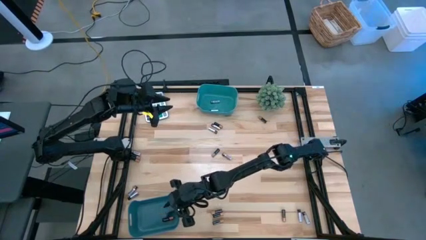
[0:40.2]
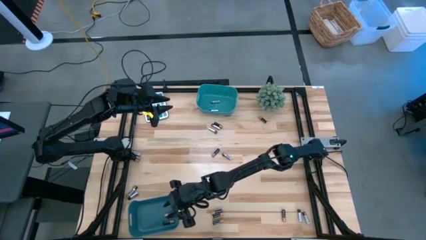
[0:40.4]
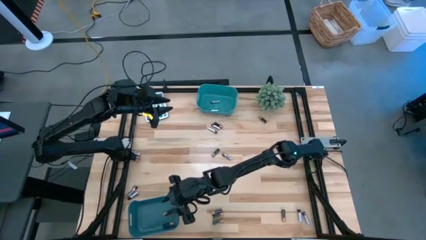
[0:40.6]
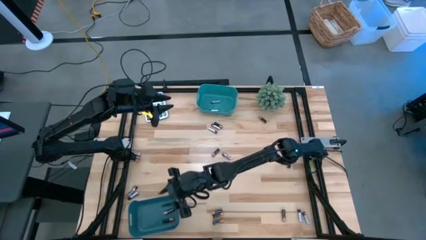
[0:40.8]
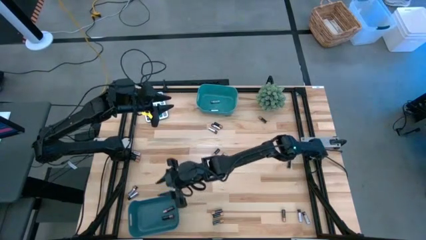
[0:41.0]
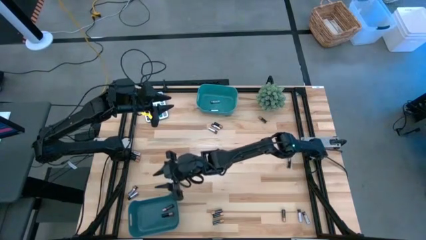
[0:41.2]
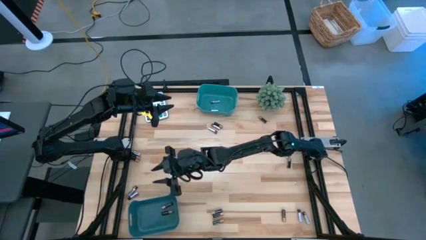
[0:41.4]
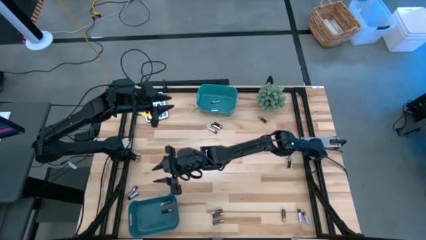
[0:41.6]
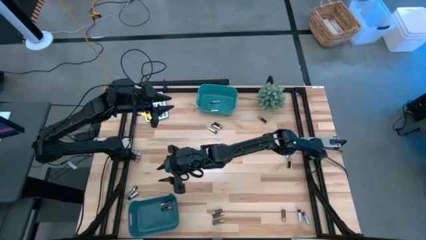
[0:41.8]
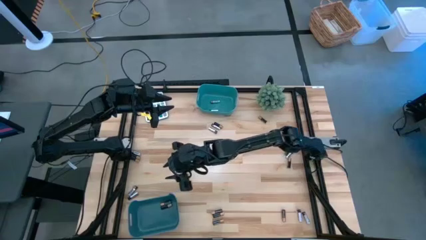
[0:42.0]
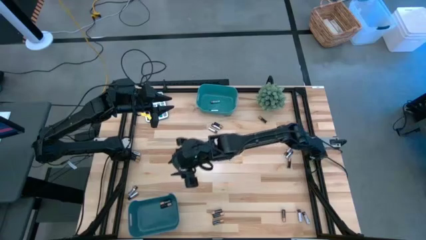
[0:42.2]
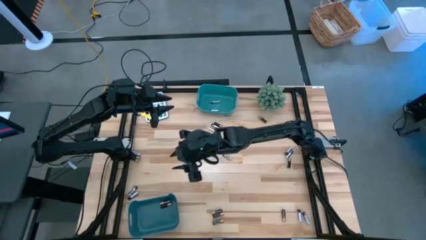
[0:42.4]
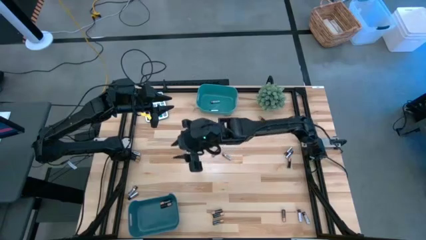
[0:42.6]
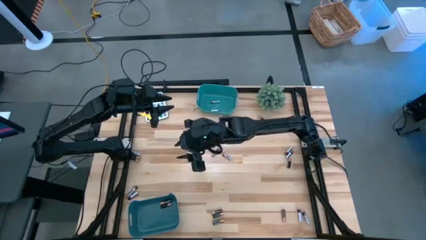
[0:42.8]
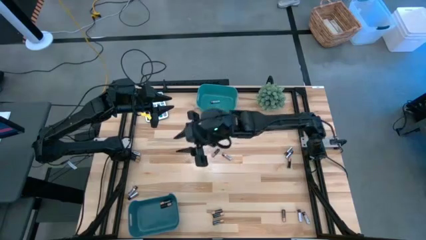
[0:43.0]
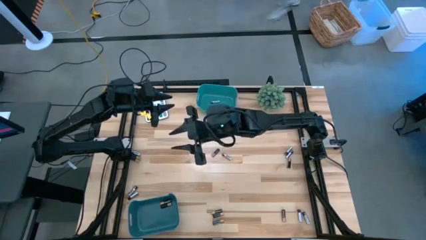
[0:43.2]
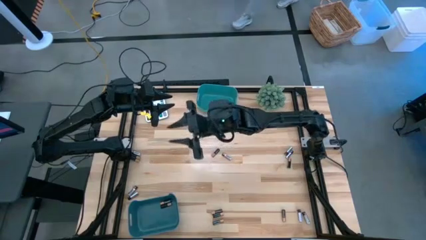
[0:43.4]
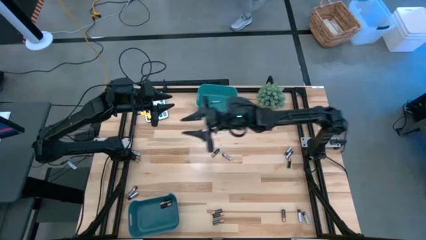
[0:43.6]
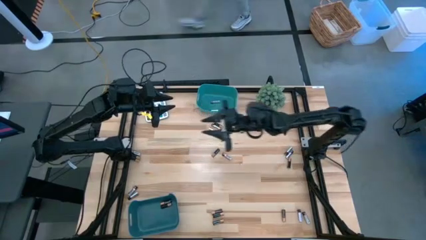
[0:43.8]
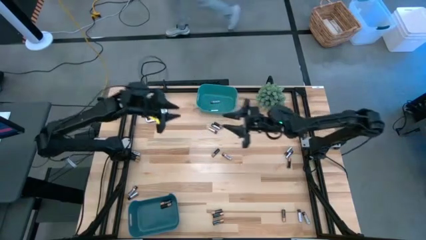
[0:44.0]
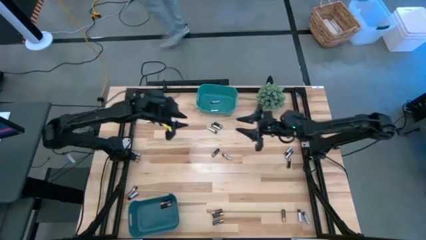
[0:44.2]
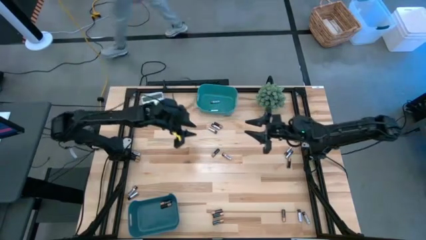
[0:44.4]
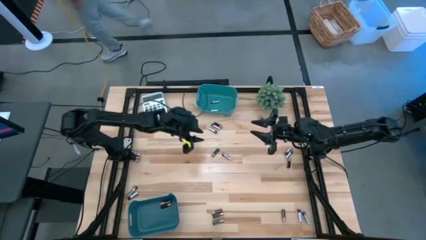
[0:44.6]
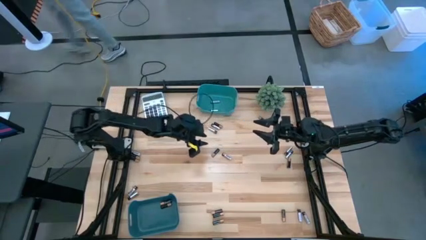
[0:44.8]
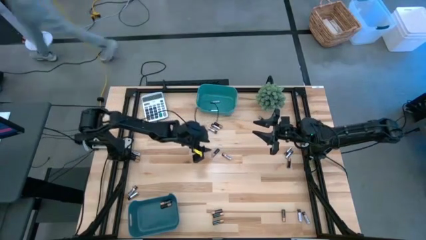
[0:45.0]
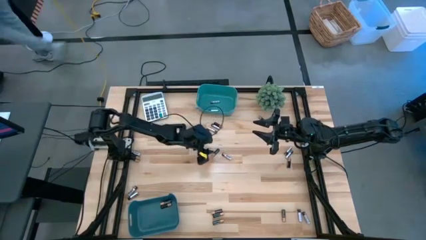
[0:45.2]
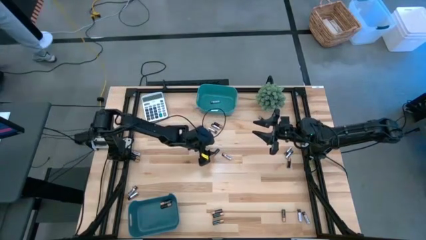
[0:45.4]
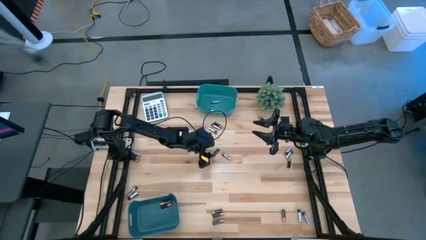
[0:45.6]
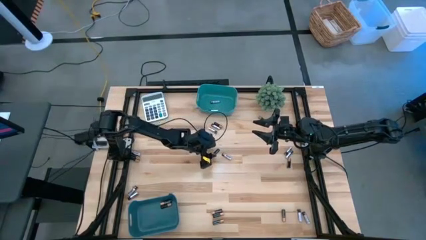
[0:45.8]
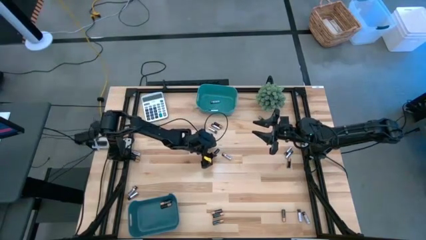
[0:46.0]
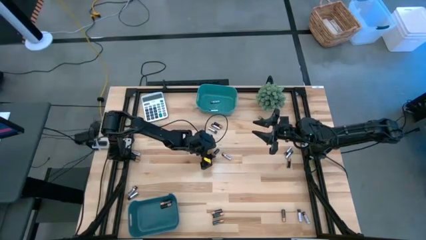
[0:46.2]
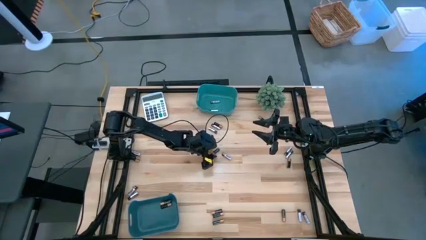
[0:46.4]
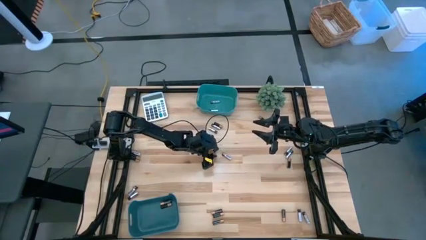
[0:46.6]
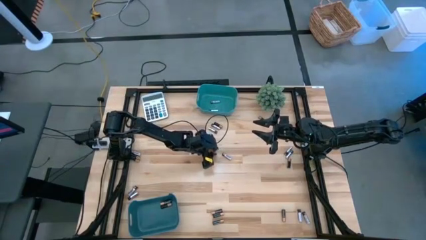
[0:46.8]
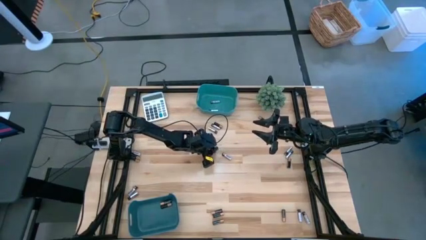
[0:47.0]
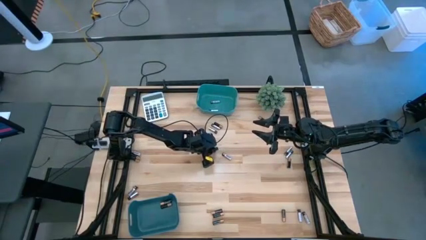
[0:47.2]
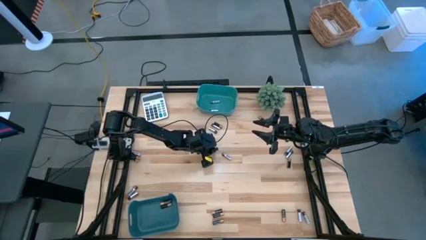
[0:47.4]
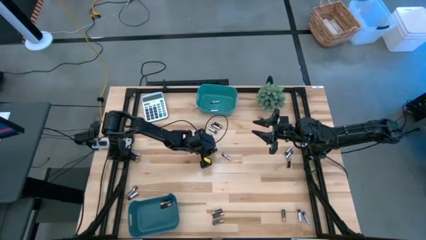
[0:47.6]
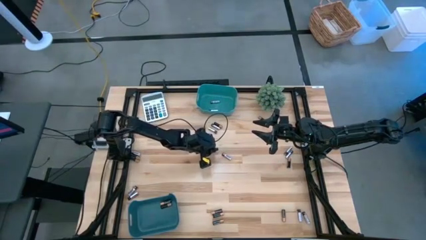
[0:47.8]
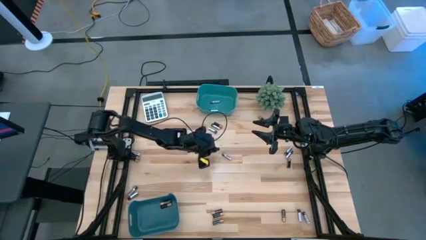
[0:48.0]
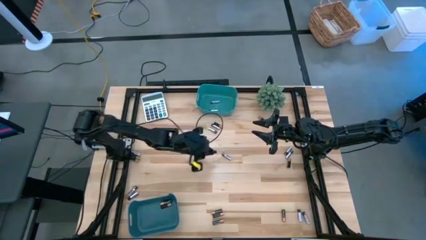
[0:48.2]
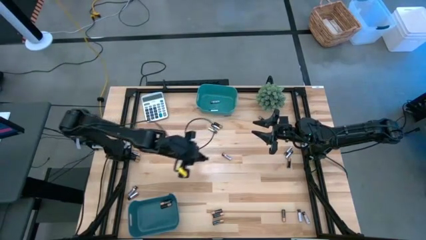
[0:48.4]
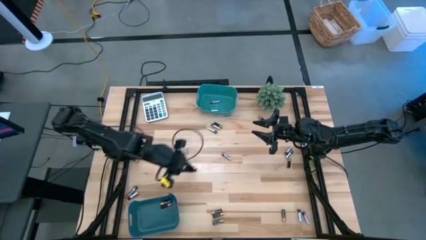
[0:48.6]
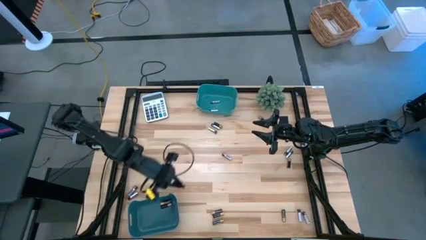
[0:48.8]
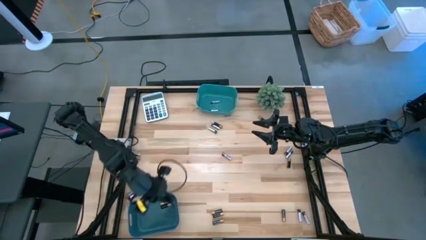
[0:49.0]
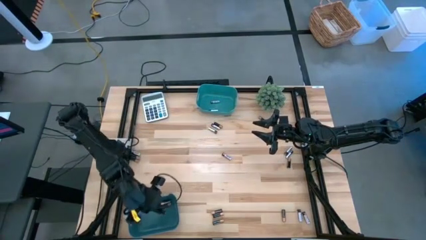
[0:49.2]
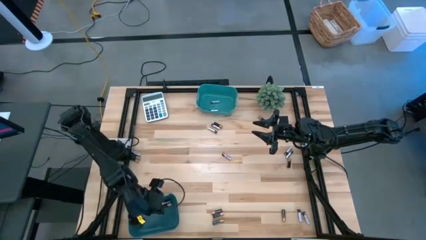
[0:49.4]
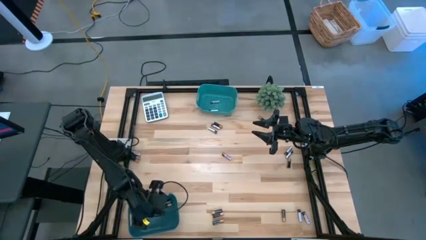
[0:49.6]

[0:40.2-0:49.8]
Task: Sort batteries
Put the gold battery into the bottom green bin

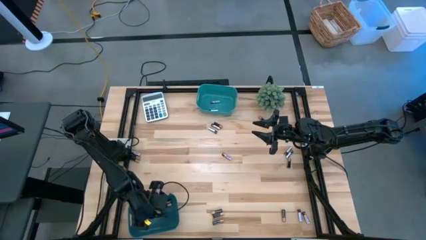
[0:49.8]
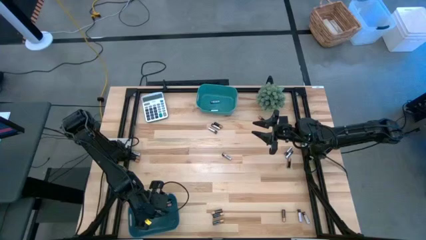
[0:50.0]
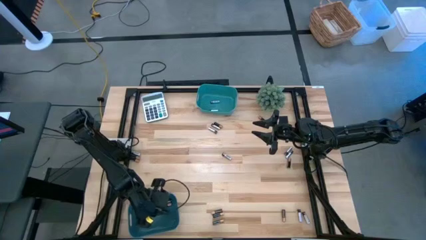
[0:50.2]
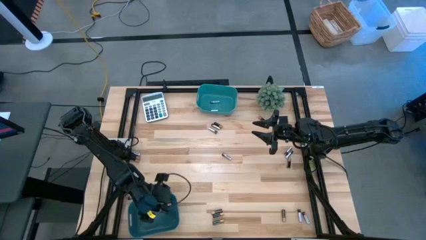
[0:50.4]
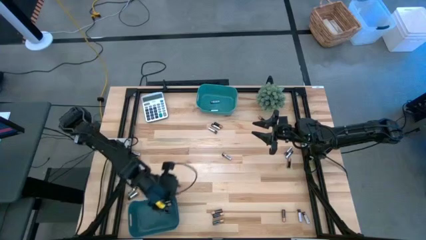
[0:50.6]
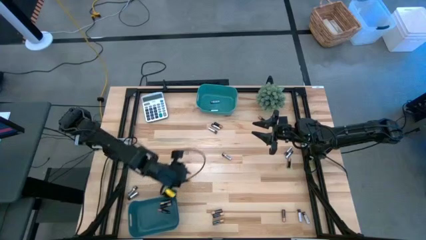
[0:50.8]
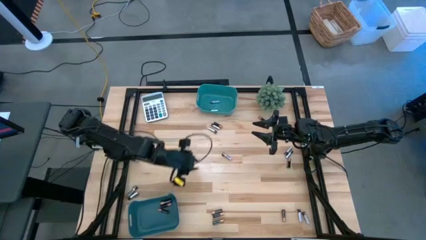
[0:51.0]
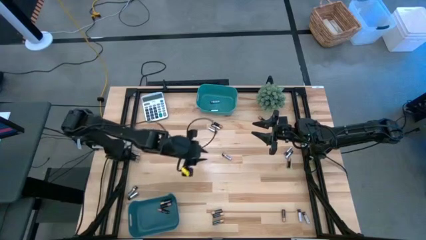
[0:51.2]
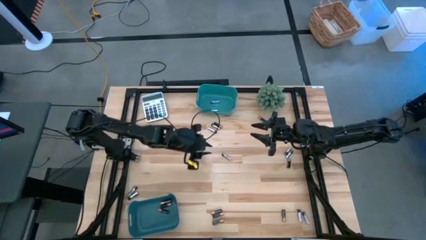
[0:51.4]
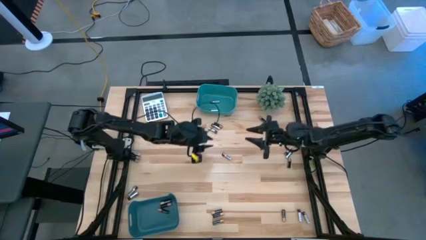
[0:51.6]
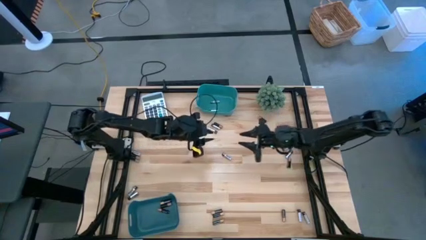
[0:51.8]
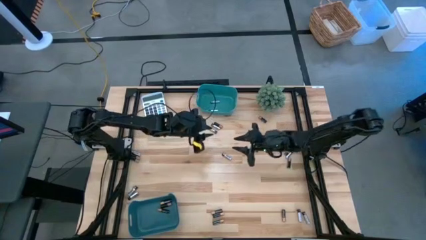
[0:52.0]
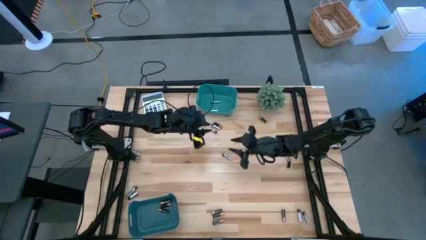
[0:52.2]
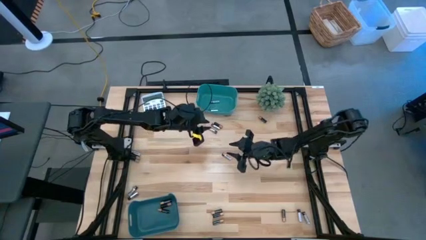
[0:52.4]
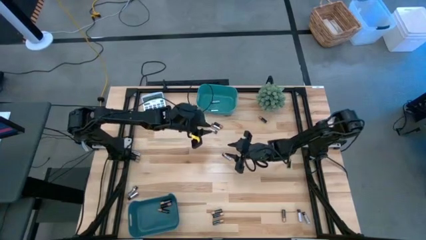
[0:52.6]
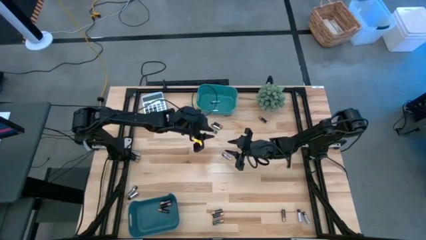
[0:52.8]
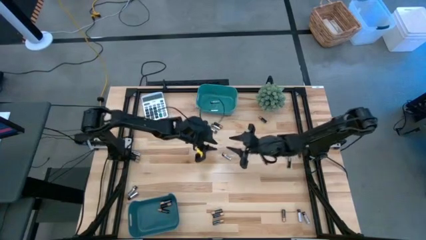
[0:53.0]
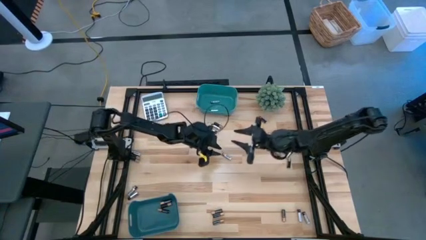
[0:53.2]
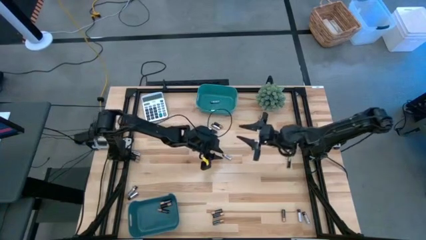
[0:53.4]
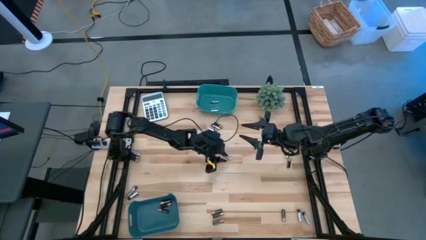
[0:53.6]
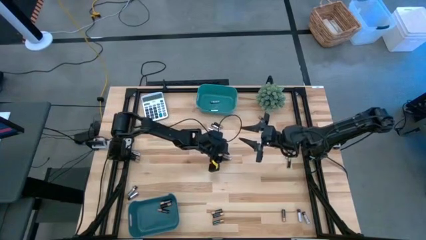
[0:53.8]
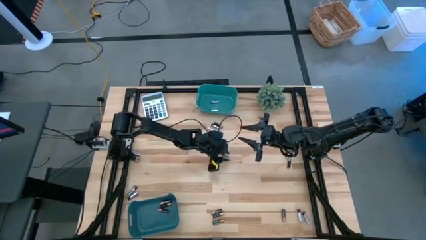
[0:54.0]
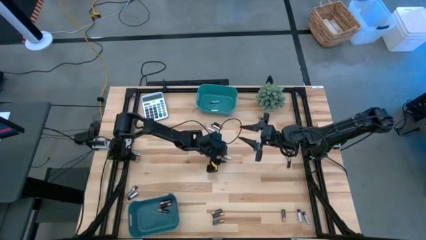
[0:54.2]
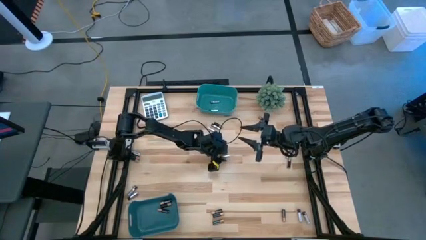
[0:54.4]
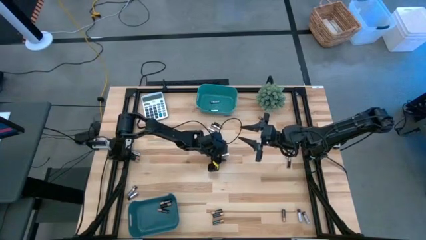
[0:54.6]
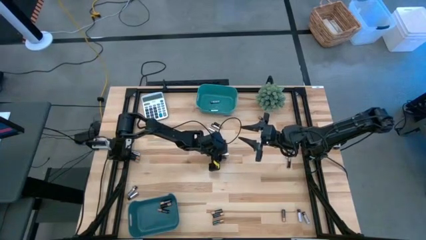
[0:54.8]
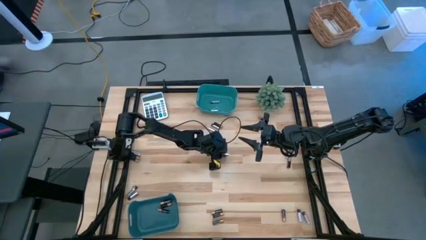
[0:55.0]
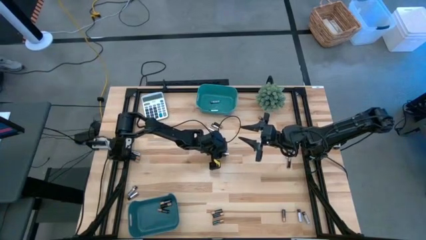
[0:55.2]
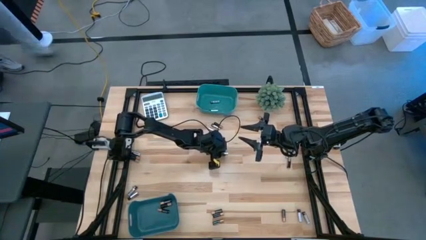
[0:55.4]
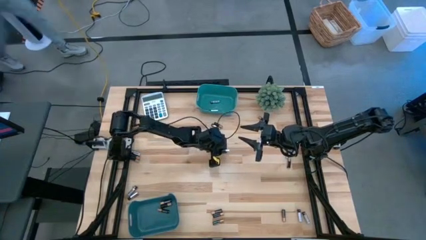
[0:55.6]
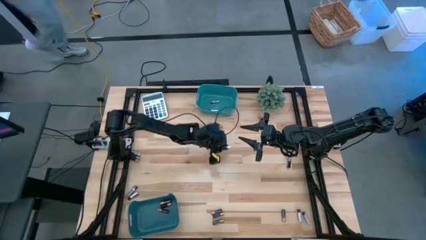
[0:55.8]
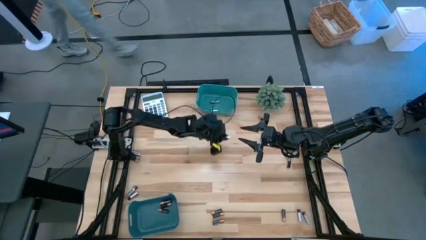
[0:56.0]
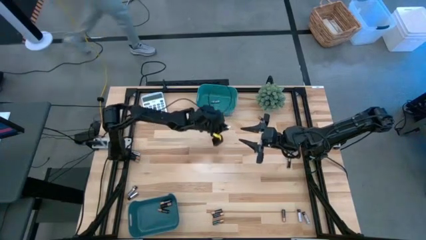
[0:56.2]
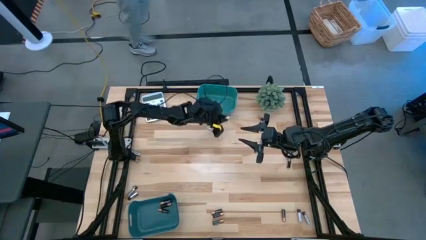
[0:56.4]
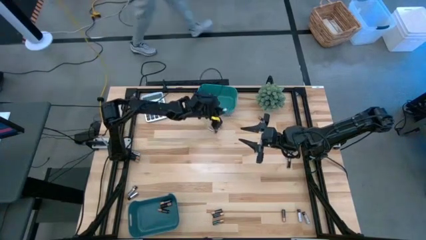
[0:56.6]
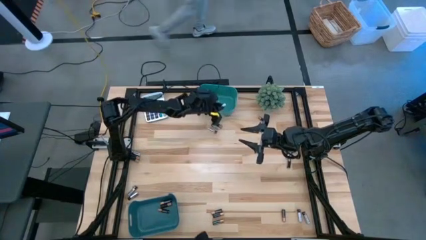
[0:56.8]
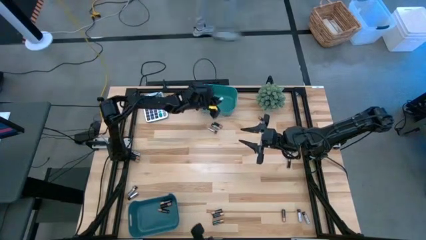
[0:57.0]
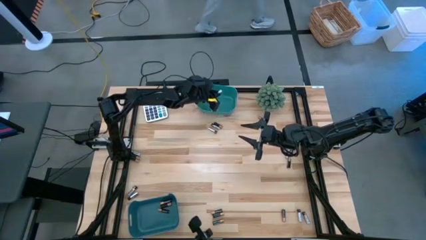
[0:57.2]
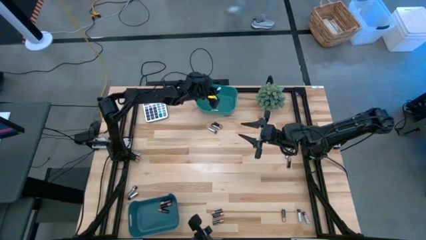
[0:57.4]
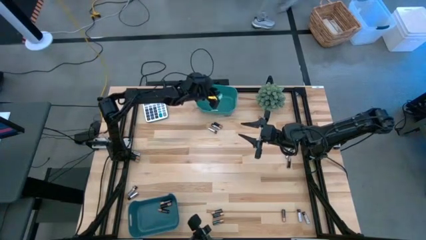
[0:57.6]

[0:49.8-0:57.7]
Put the silver battery into the top green bin
